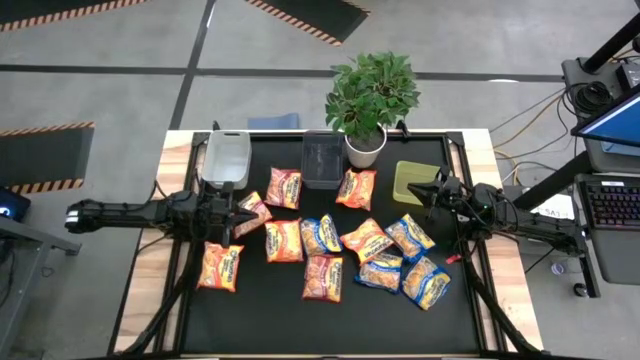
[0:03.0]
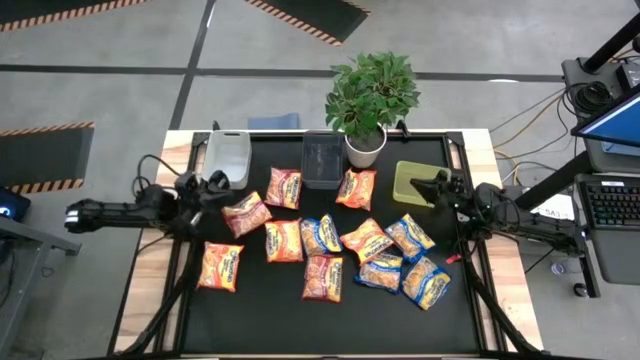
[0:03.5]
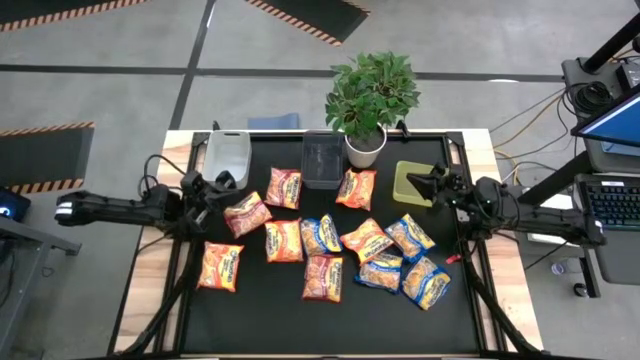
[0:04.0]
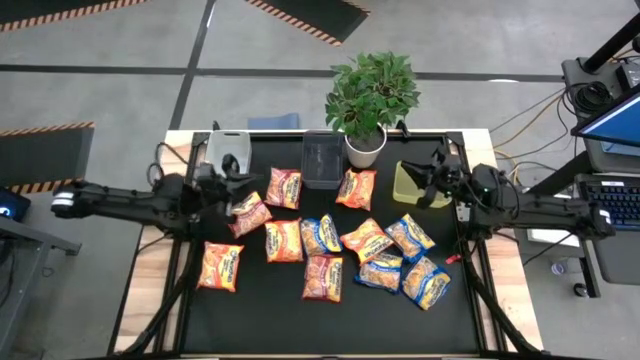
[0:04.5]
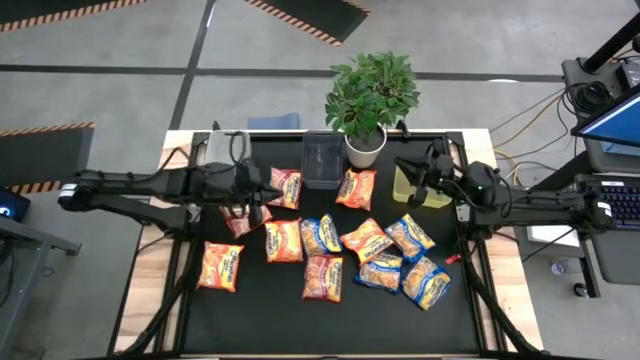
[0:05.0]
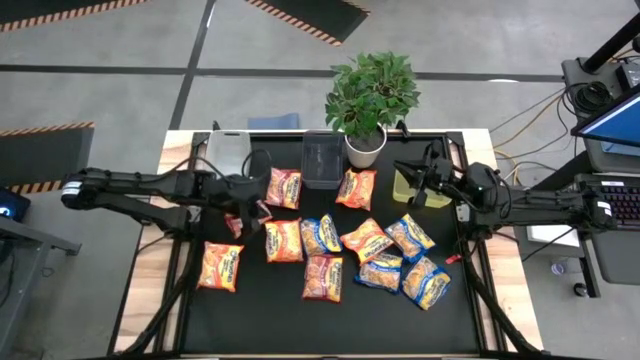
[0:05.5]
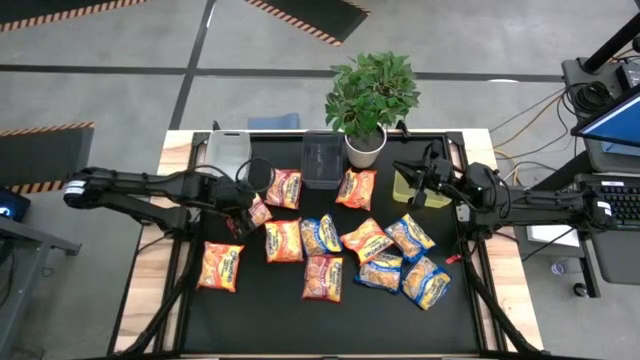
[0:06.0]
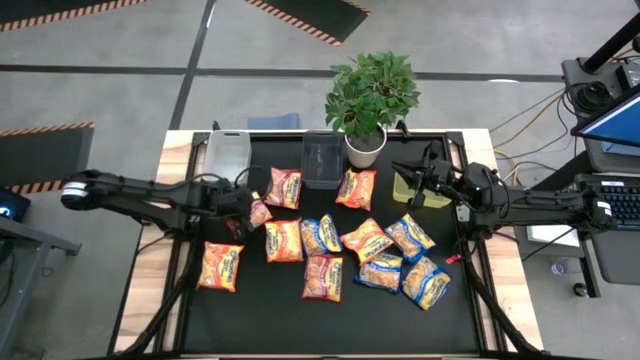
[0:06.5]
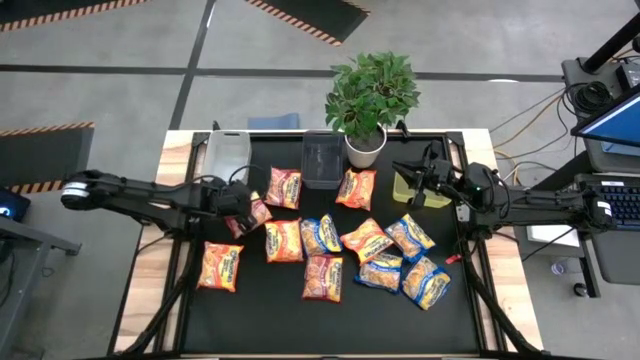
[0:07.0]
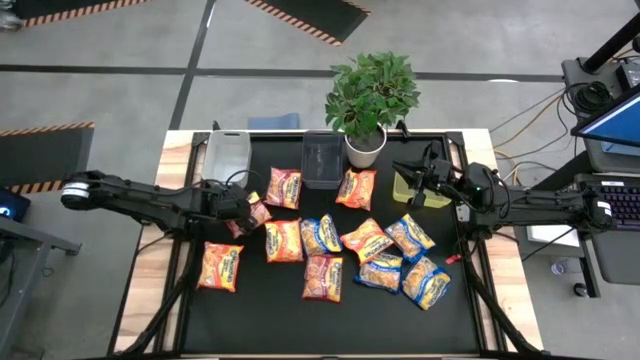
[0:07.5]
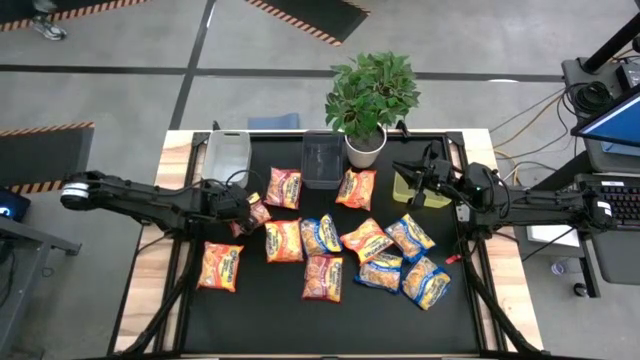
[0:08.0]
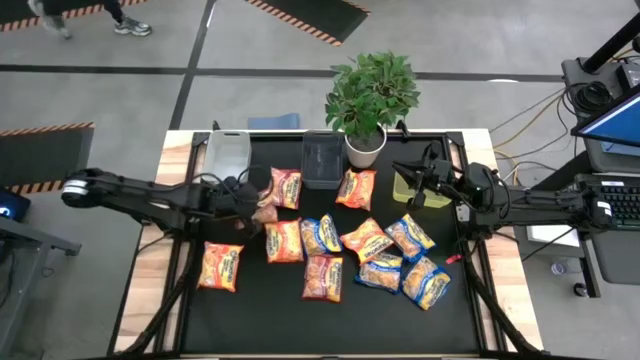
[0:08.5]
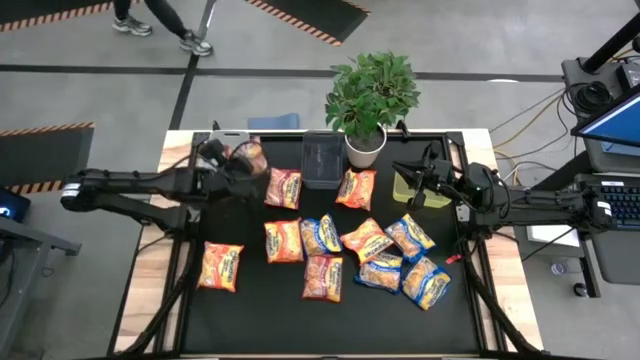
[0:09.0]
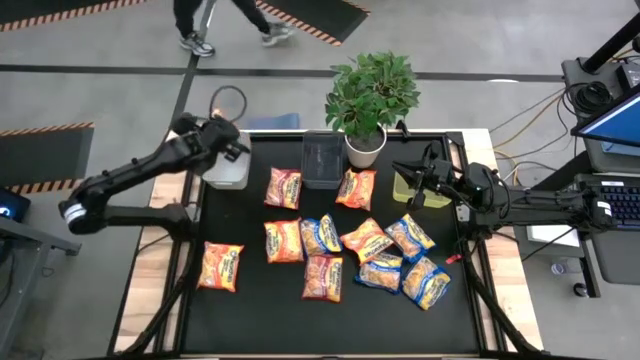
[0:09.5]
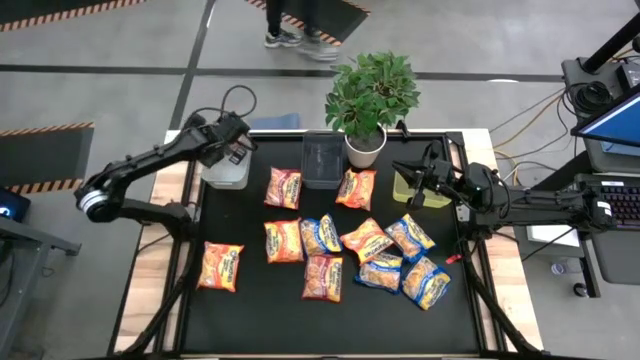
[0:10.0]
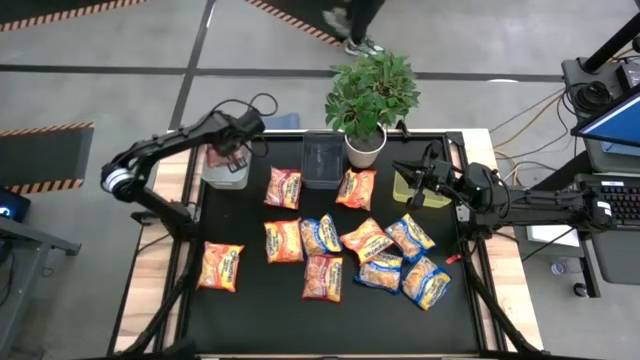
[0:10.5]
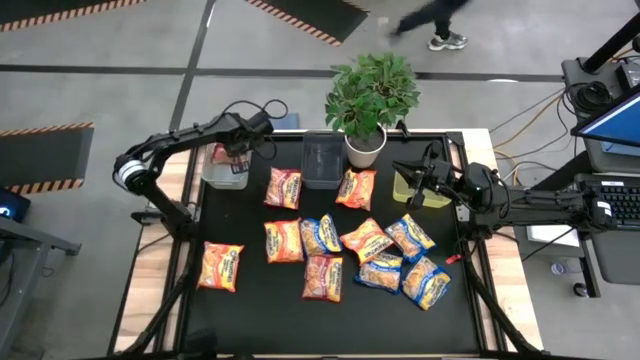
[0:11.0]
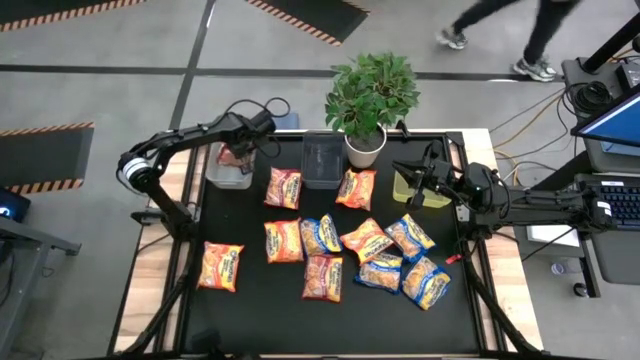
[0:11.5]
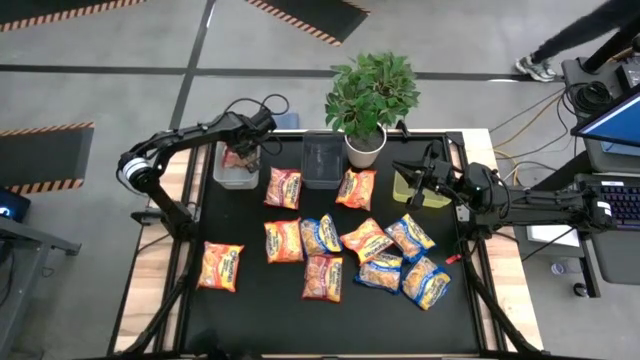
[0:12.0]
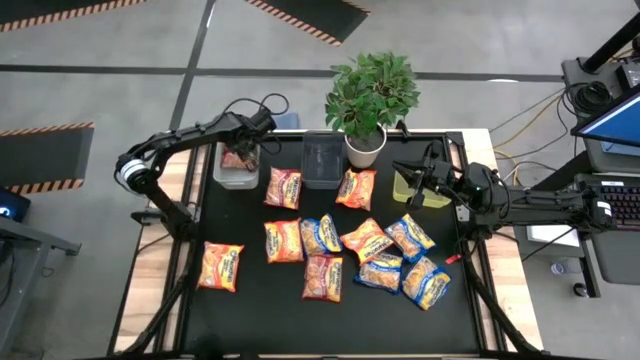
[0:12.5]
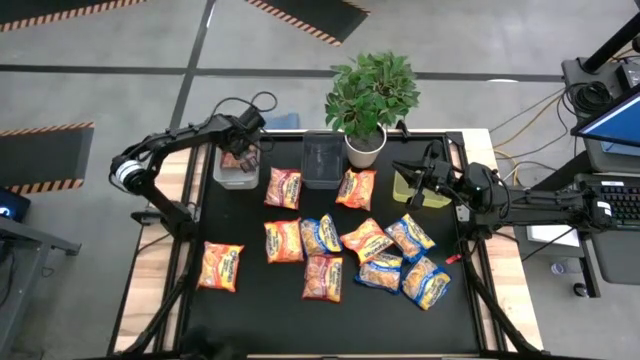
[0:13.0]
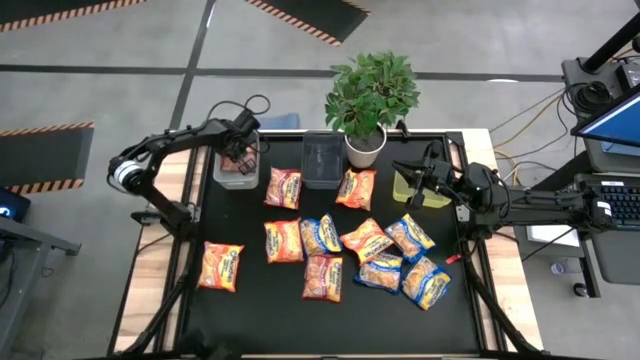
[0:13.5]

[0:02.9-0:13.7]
Task: Sort Maruchan noodles
Put the red noodle pack into the white bin

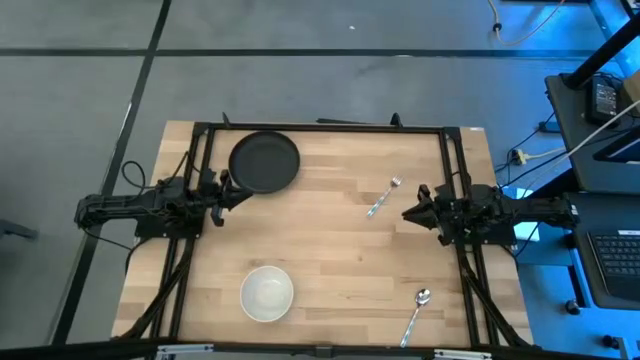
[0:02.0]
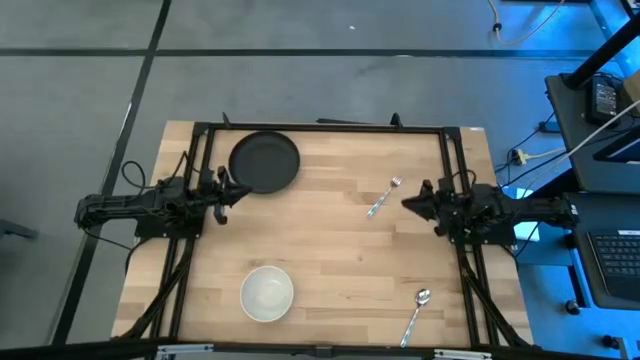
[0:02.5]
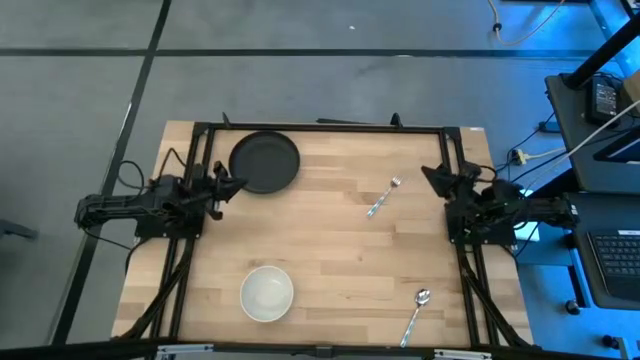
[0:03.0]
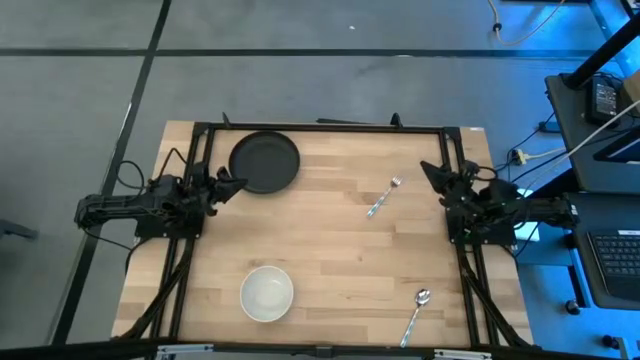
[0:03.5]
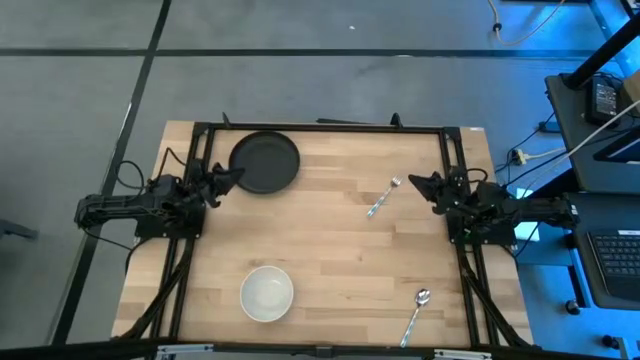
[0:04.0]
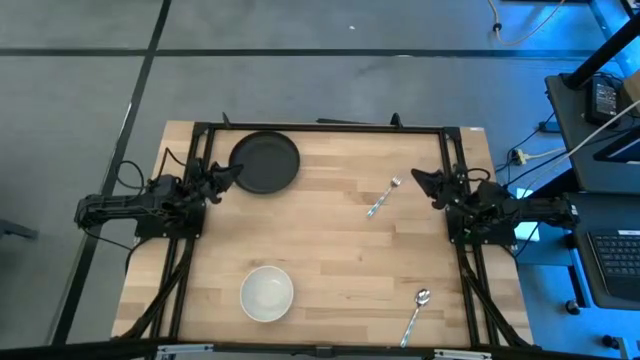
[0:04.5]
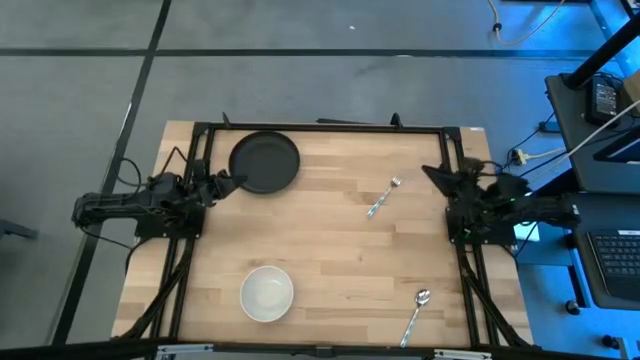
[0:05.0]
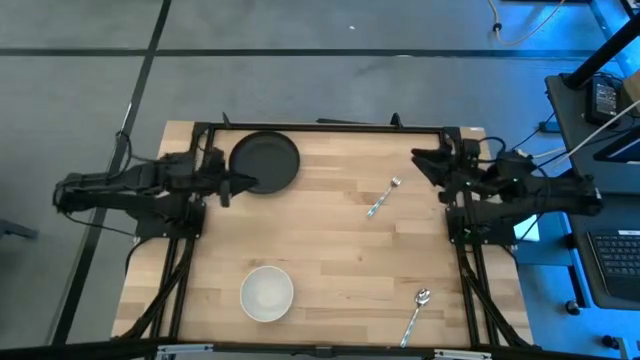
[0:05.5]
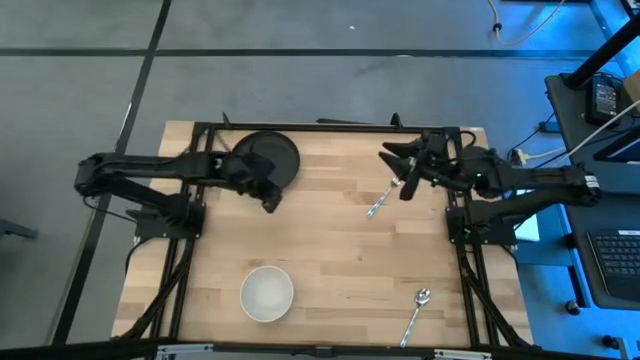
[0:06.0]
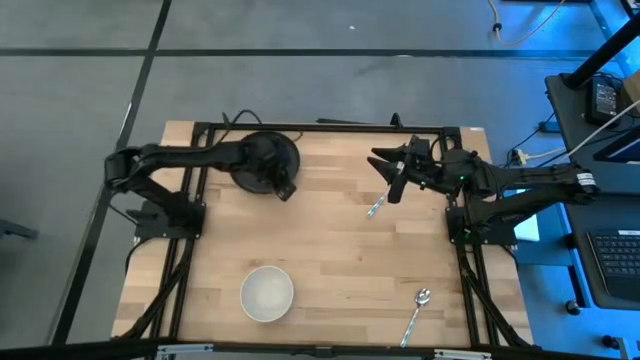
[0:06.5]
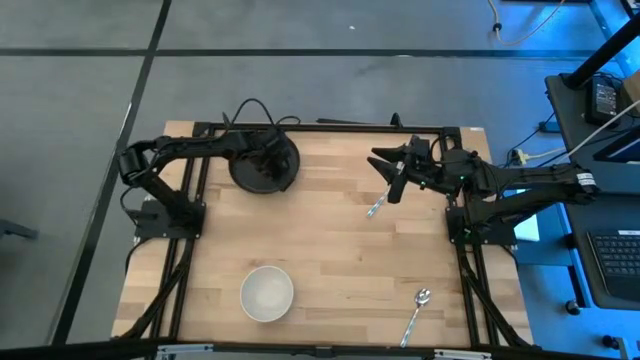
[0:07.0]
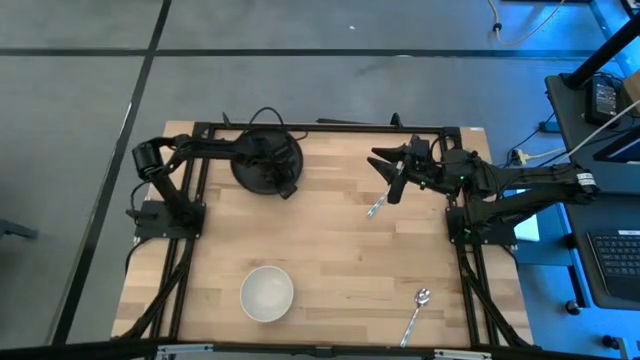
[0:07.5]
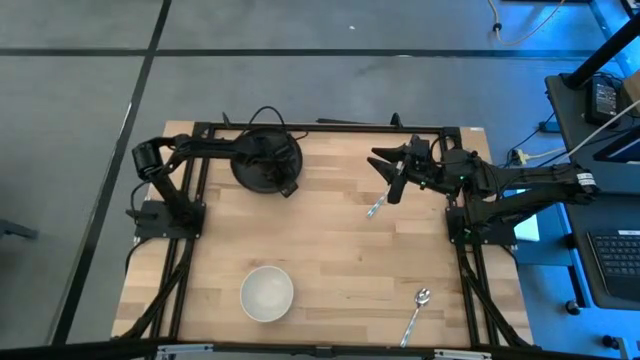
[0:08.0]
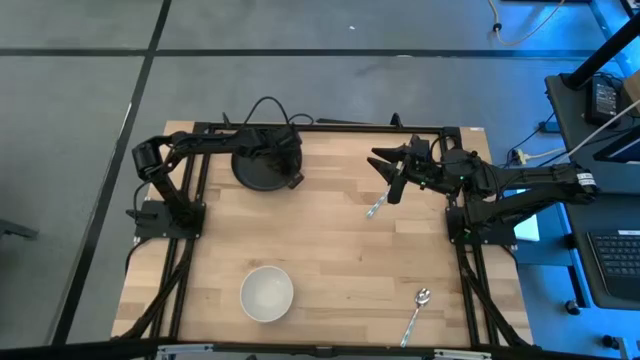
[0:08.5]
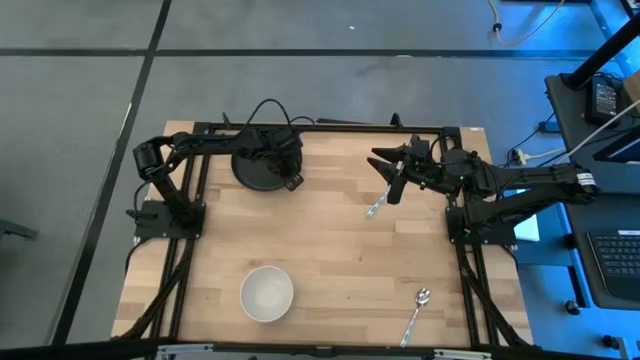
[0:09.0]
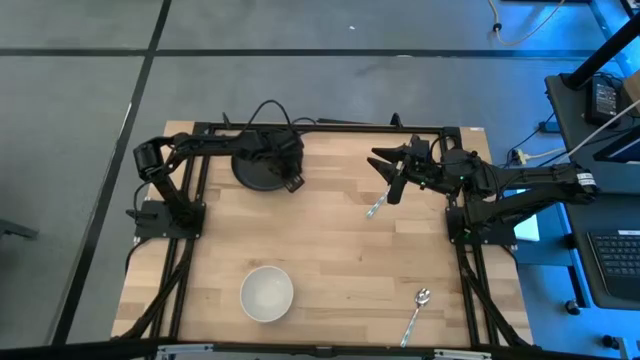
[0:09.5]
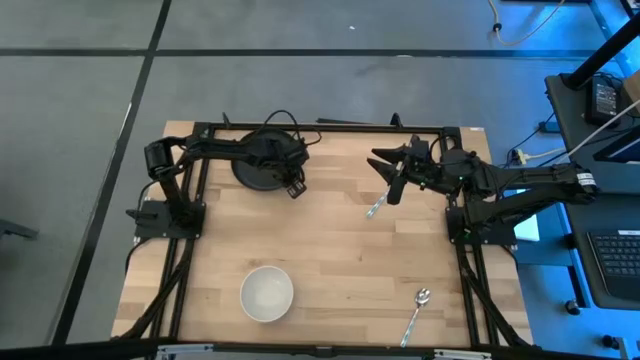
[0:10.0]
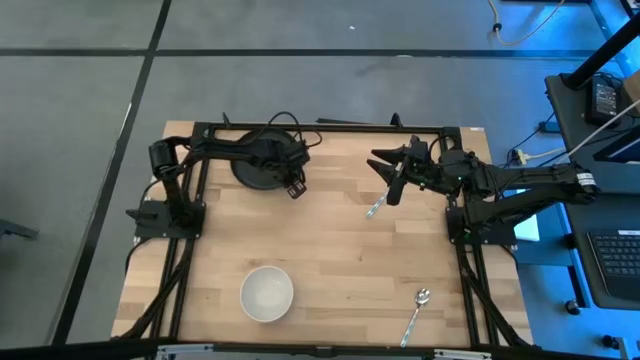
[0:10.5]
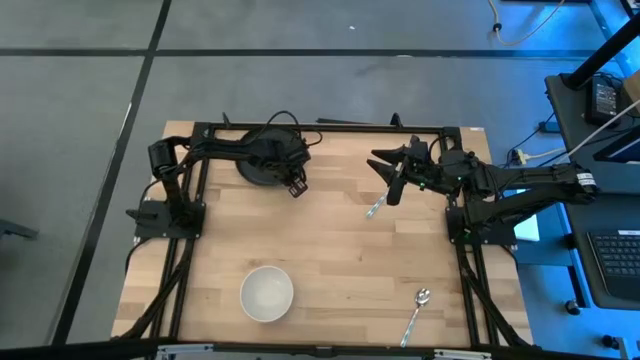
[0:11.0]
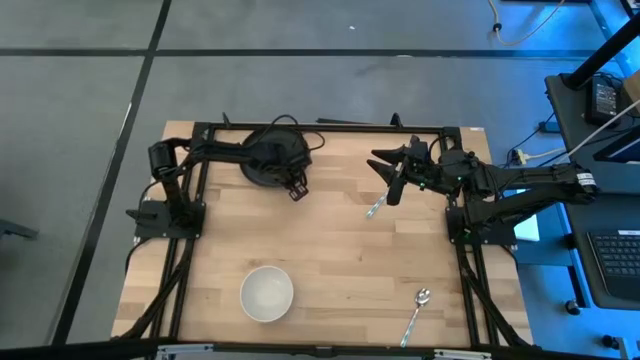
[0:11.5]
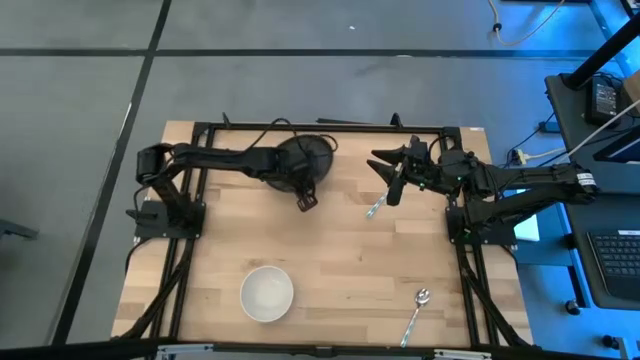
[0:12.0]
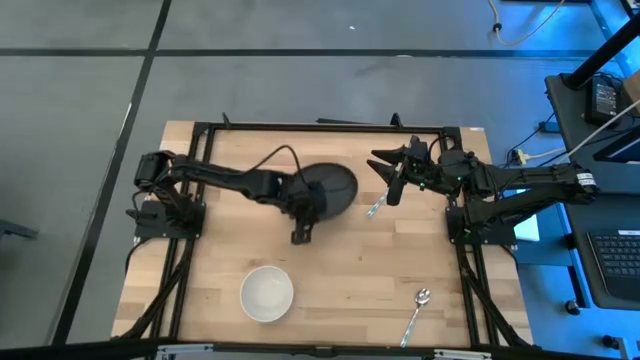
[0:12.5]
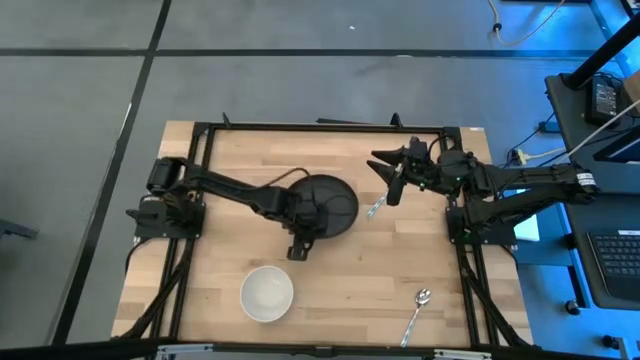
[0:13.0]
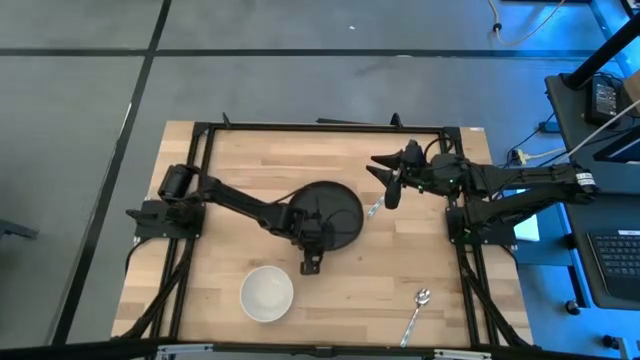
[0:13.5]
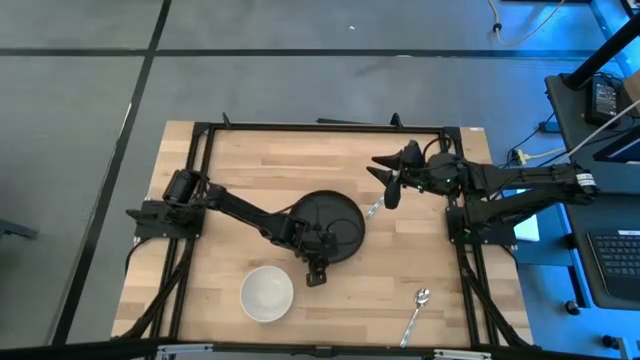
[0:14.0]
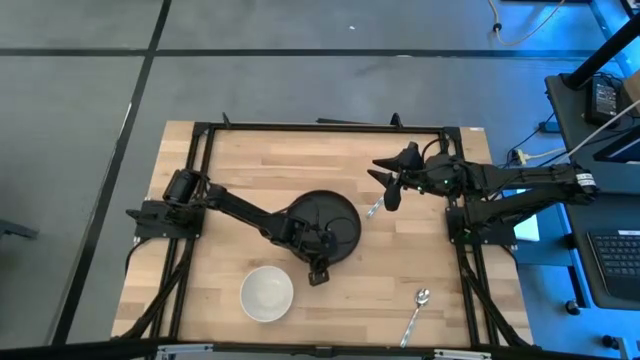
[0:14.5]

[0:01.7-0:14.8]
Task: Set table place
Move the black plate to the center of the table
